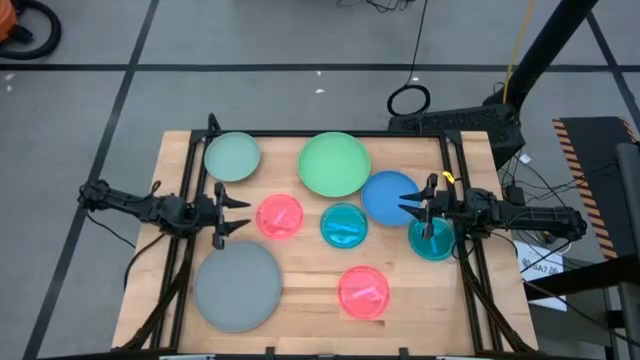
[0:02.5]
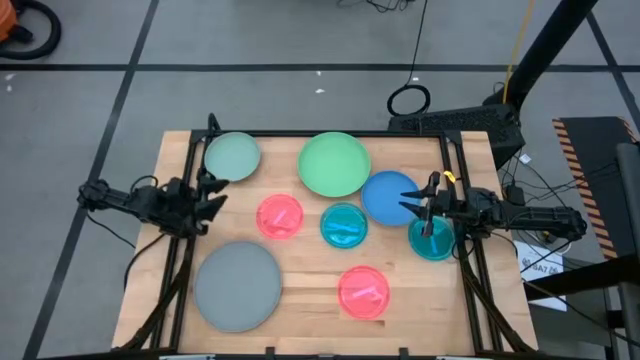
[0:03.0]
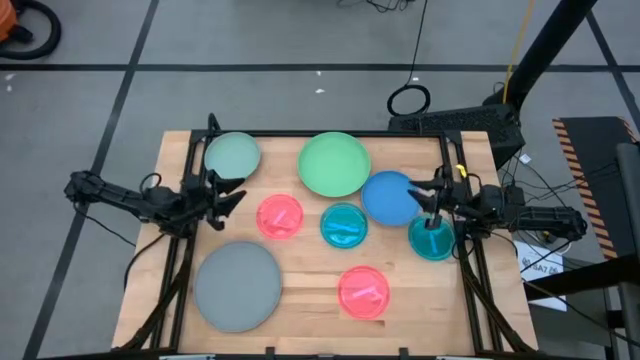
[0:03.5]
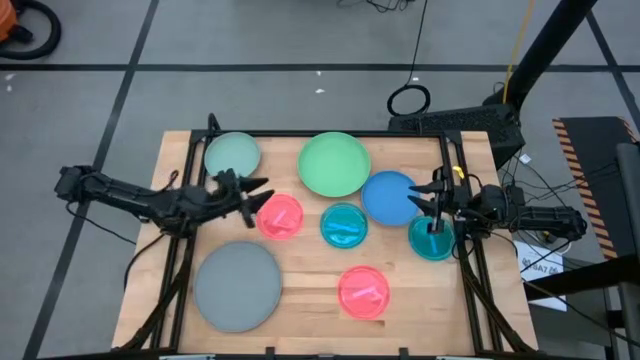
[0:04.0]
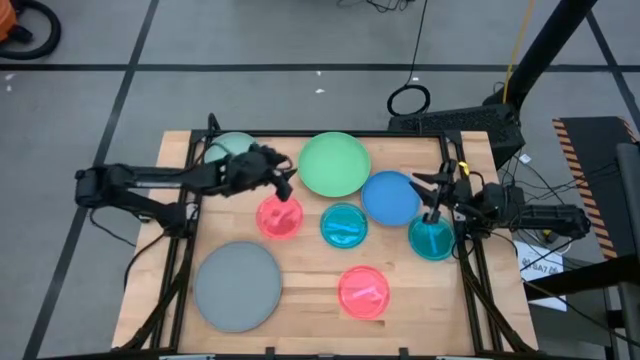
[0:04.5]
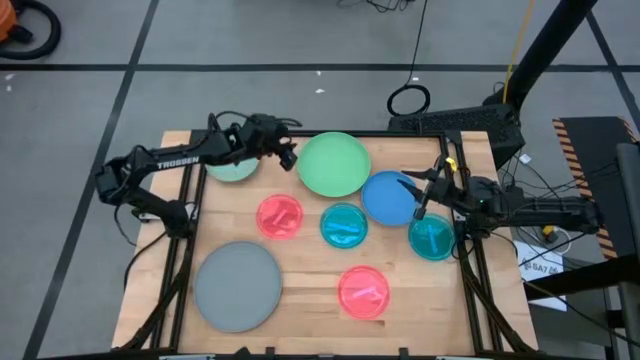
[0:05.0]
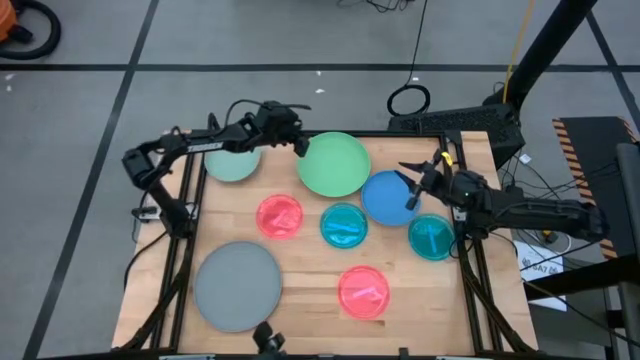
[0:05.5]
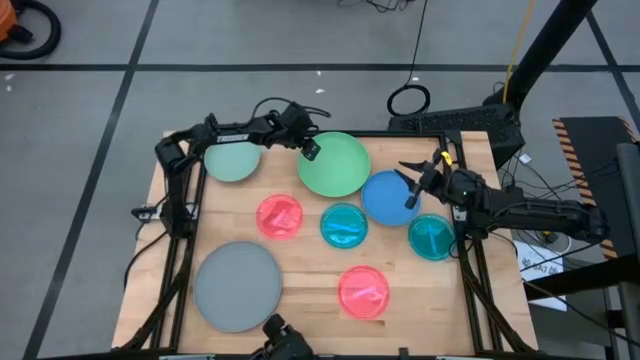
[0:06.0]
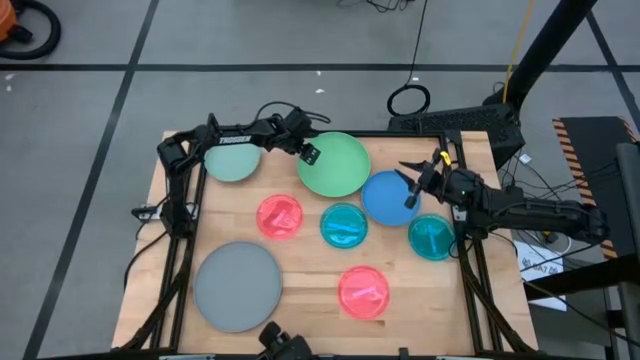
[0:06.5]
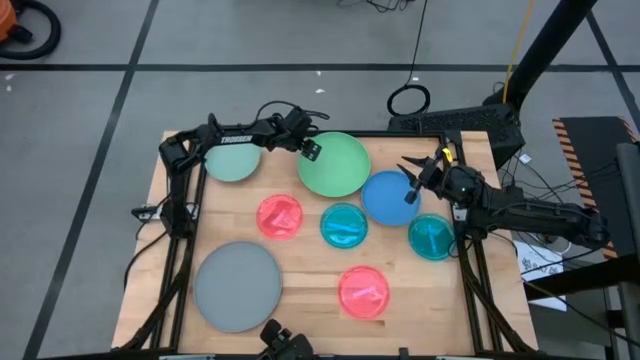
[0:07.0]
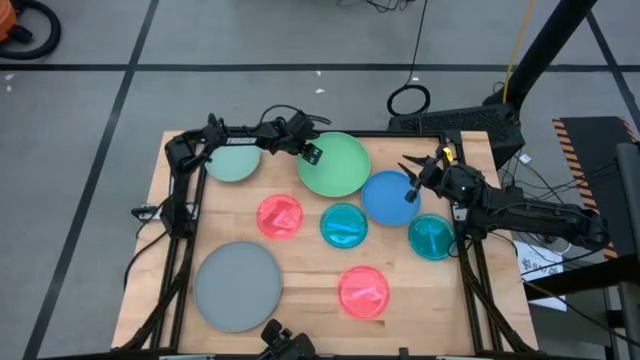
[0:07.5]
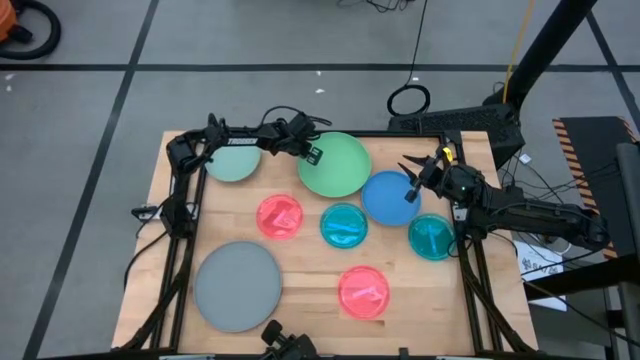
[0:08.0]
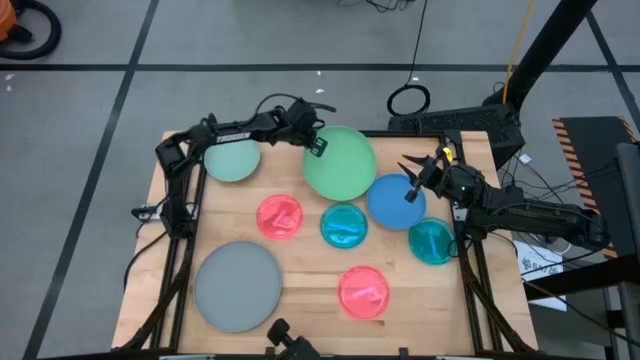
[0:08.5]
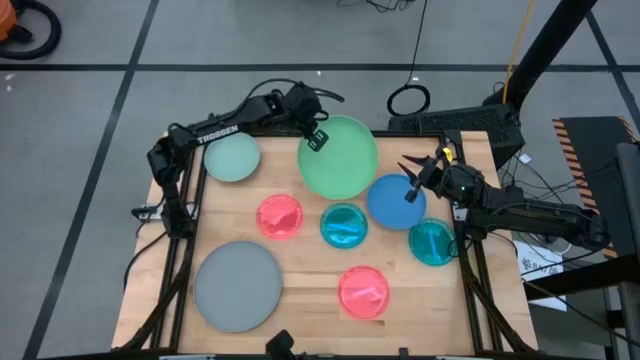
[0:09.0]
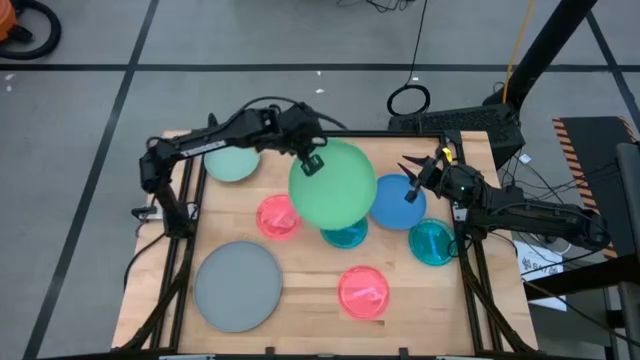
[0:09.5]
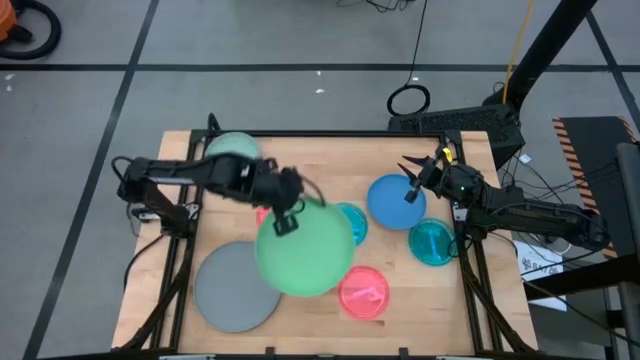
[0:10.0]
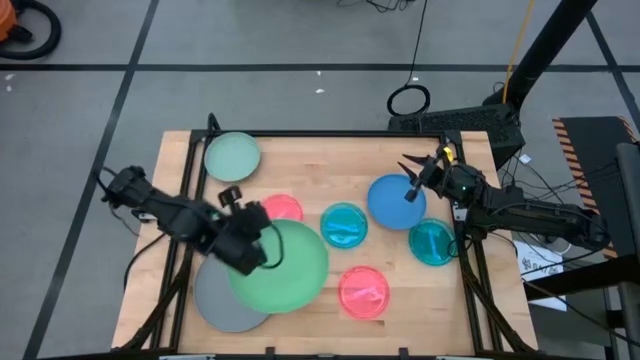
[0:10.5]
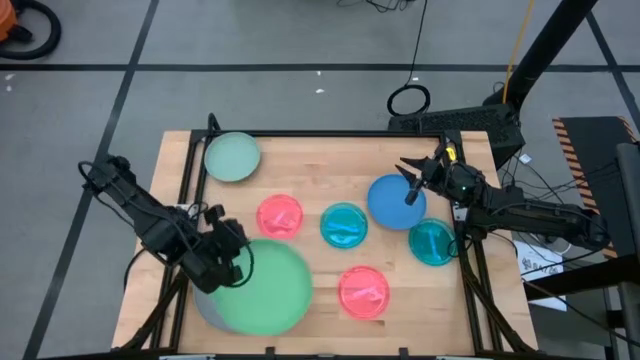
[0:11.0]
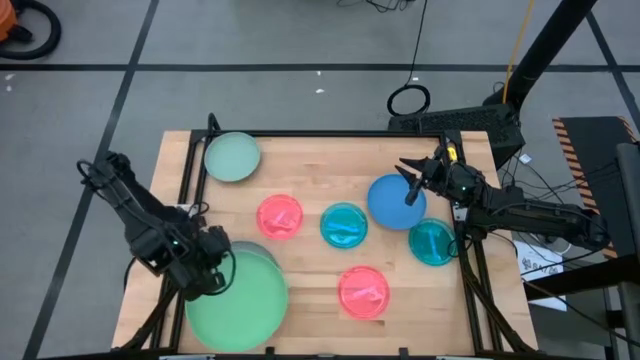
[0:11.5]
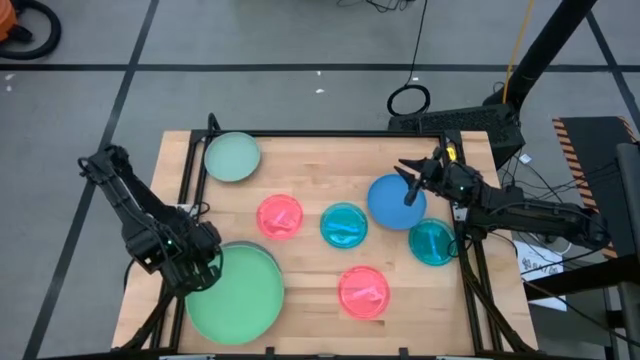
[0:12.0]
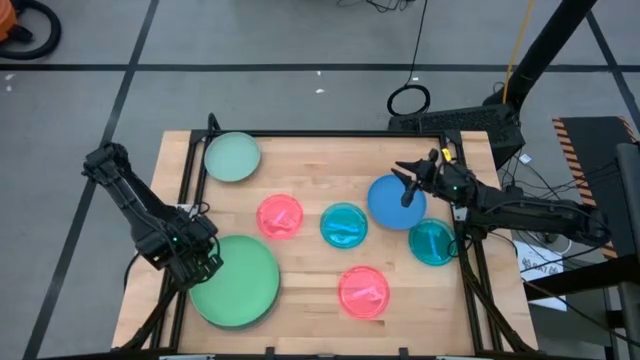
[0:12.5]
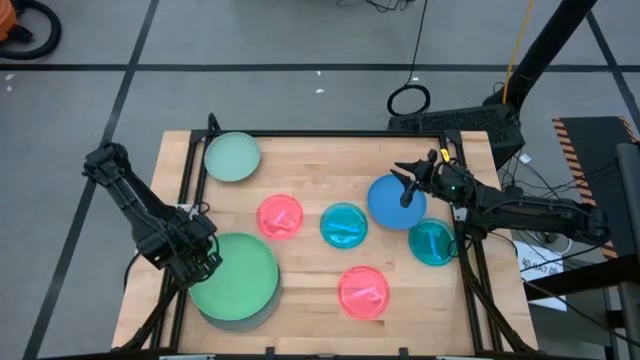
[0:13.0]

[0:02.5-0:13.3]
Task: Stack plastic plates
Stack the green plate on the gray plate

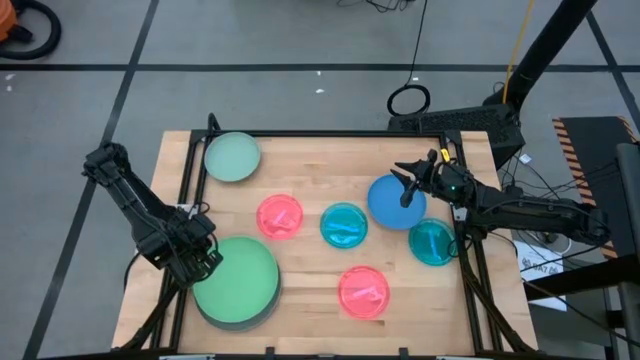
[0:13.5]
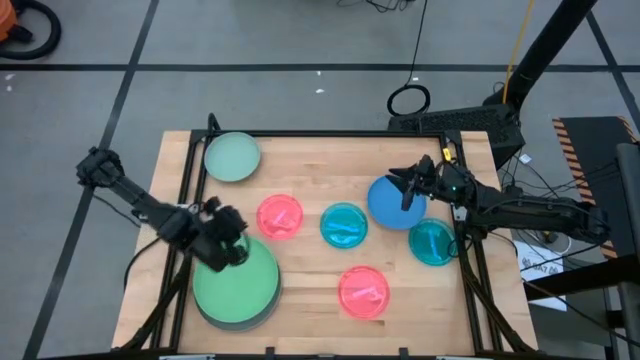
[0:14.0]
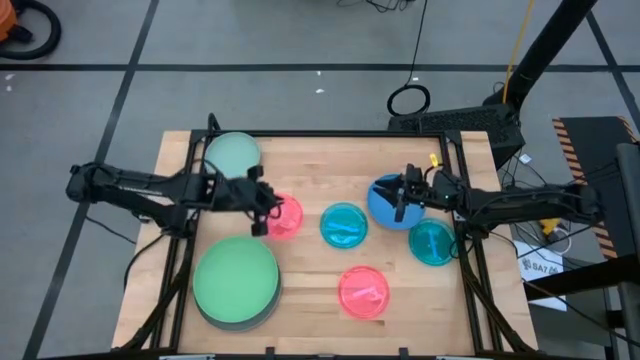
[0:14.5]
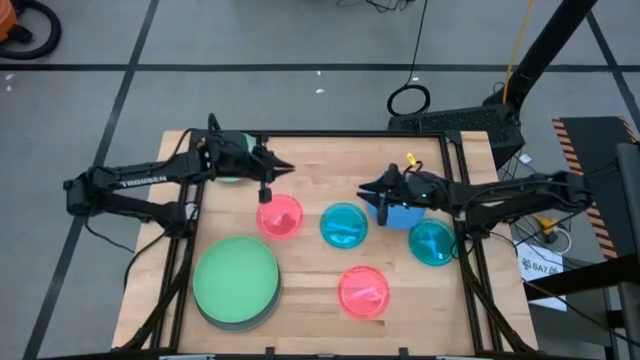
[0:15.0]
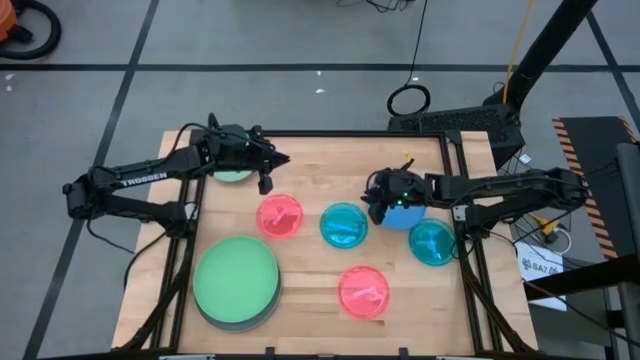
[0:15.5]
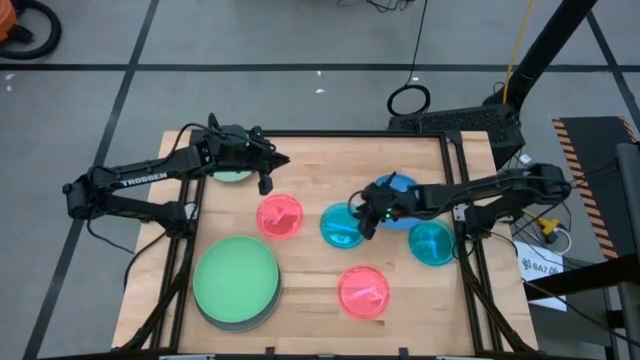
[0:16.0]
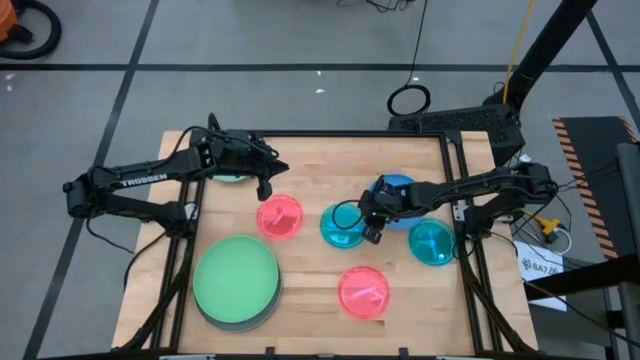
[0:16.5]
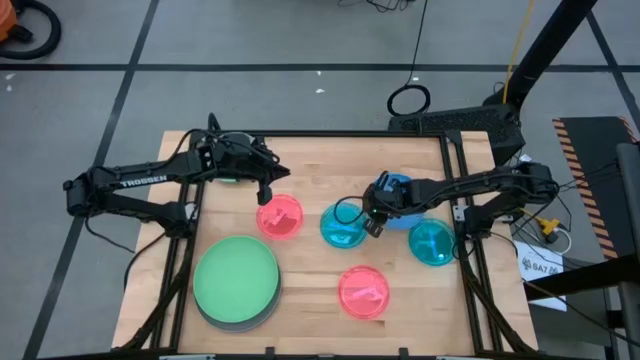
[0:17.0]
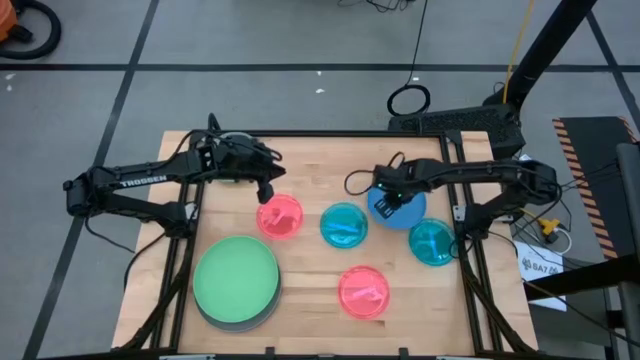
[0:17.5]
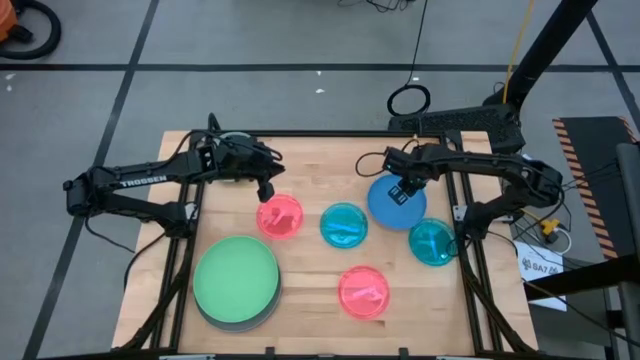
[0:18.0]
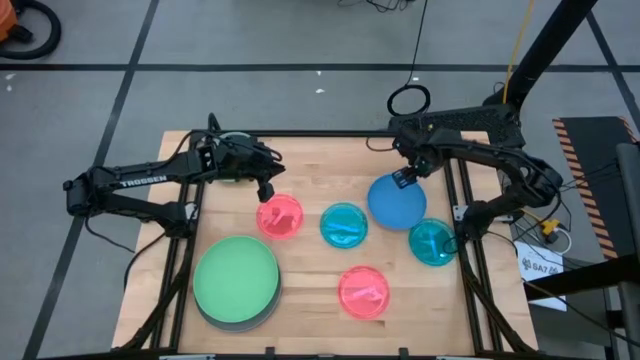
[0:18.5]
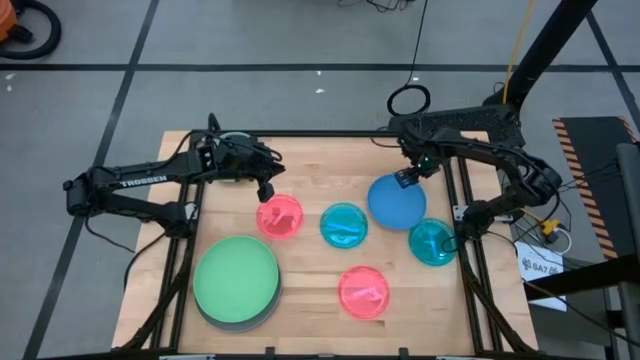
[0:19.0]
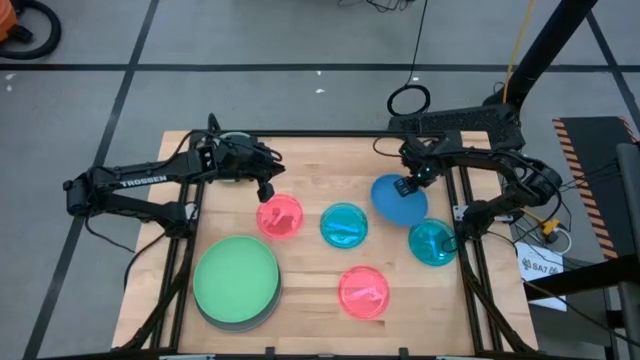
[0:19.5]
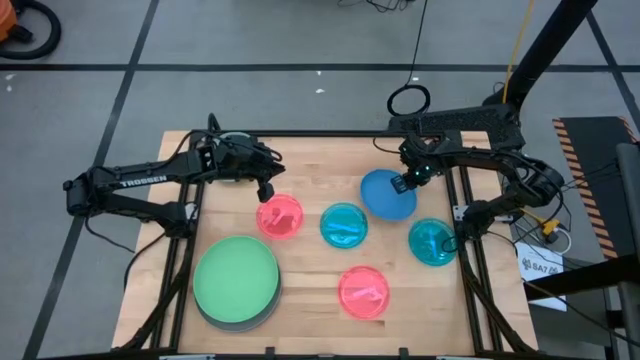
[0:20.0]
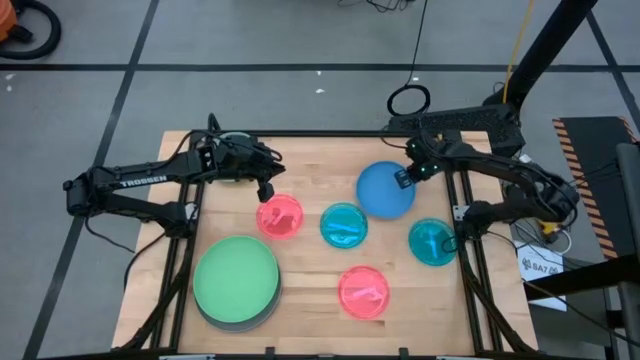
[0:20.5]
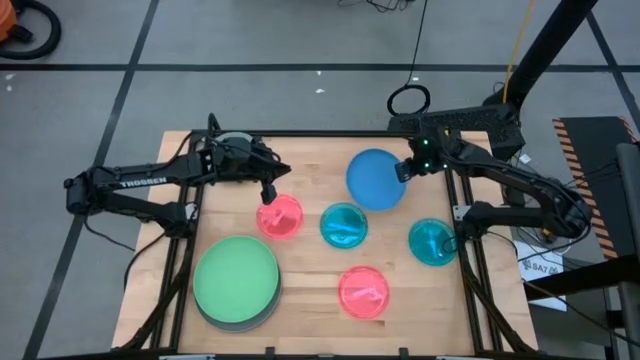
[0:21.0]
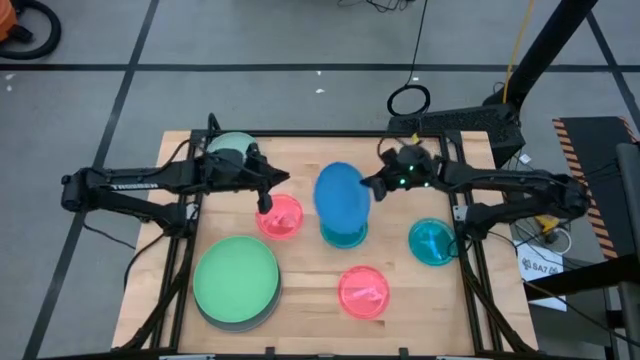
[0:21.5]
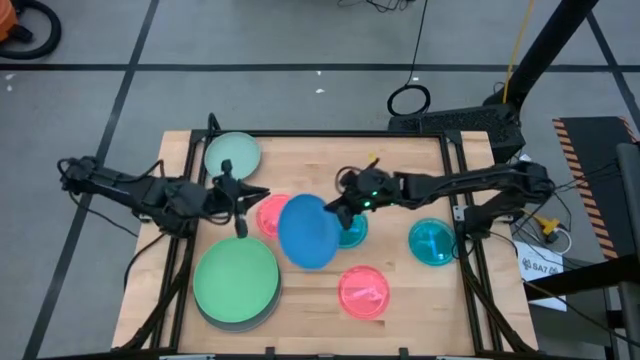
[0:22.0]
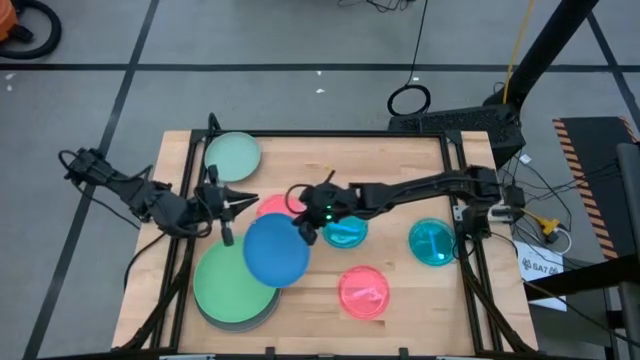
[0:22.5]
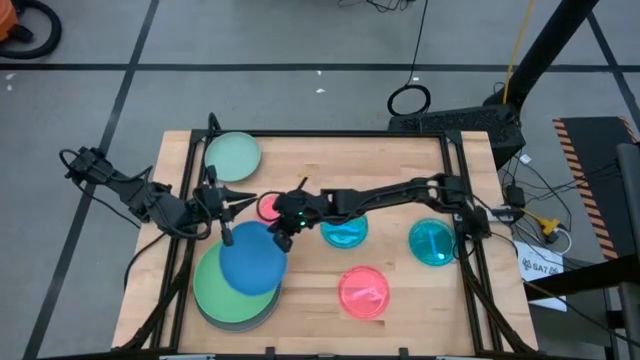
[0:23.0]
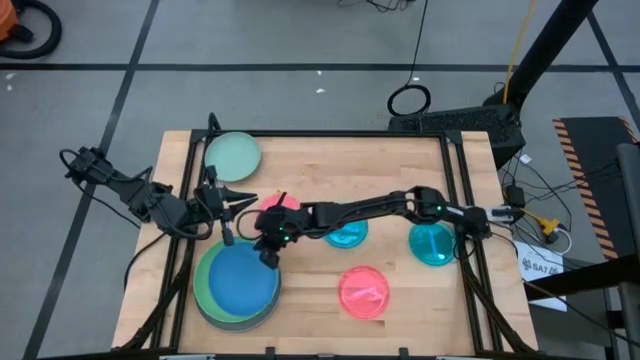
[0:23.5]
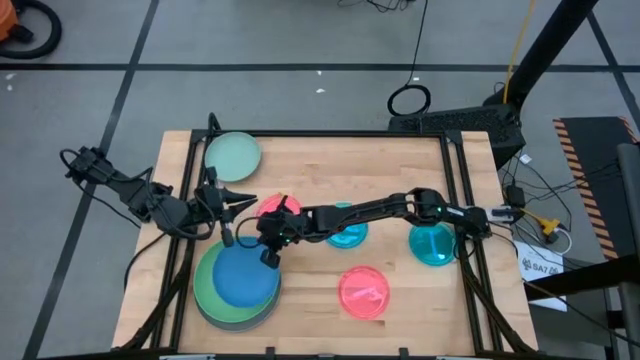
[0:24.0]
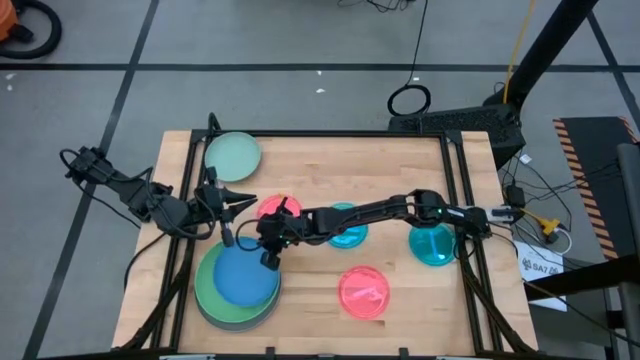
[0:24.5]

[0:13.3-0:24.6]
Stack the blue plate on the green plate
